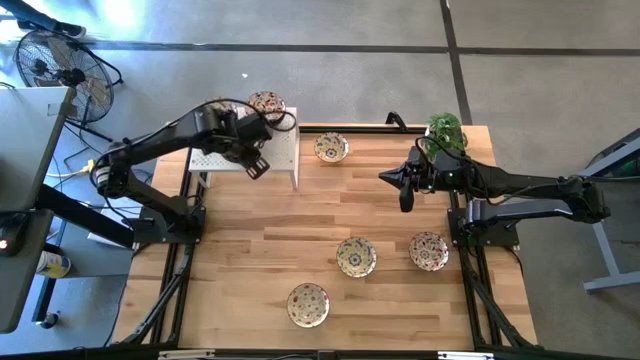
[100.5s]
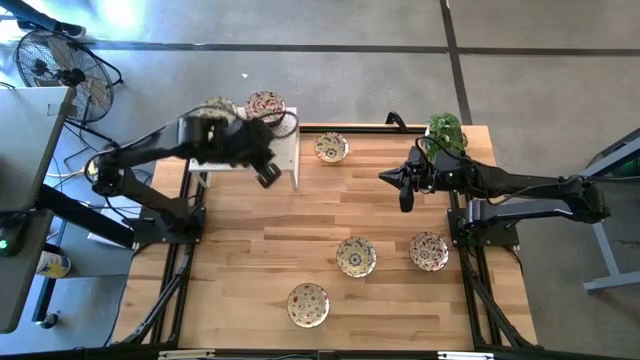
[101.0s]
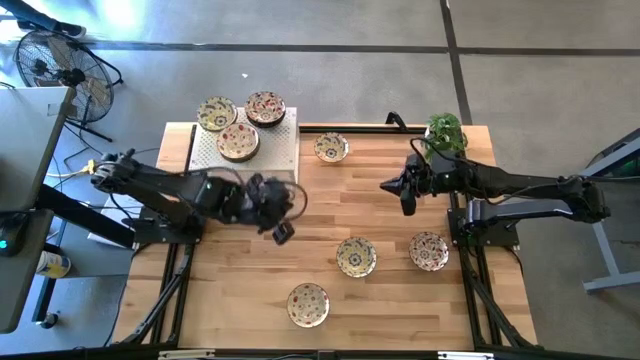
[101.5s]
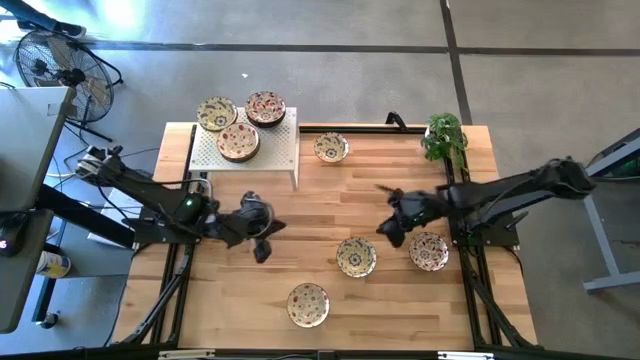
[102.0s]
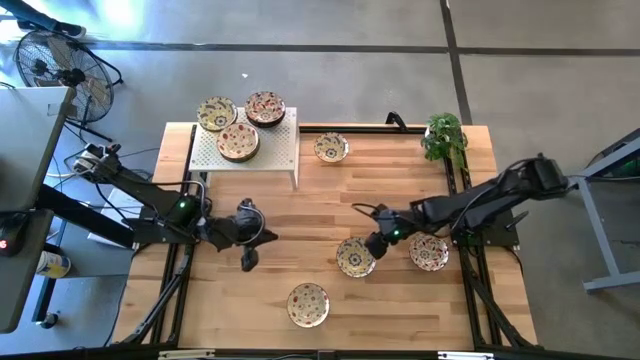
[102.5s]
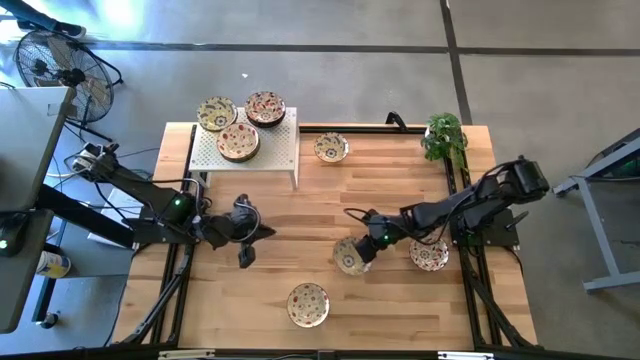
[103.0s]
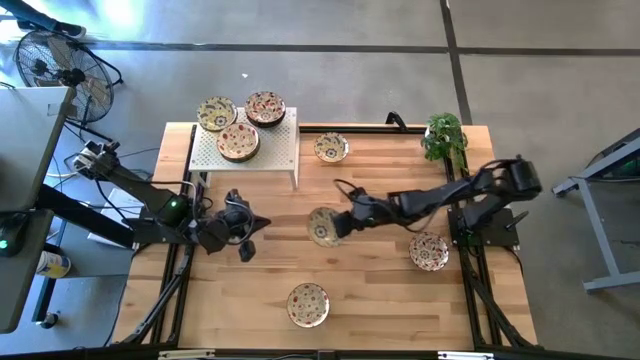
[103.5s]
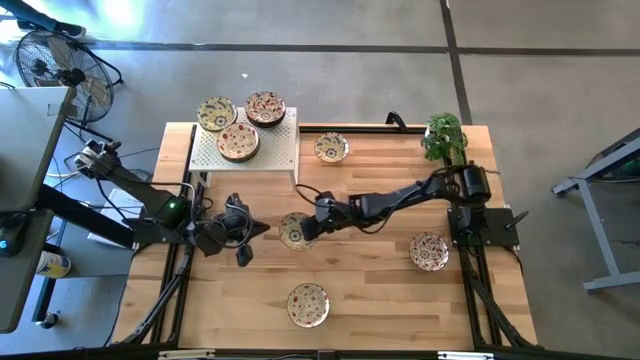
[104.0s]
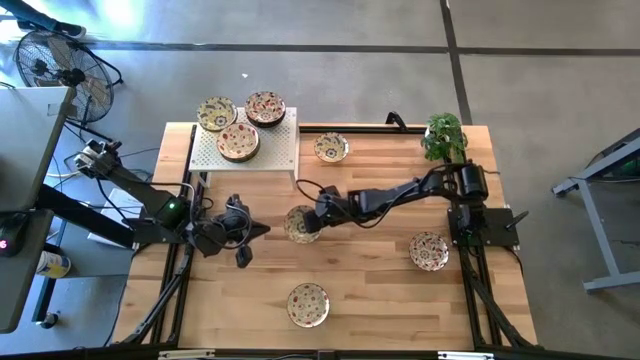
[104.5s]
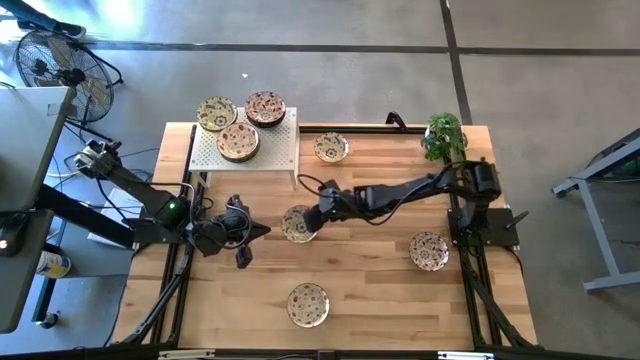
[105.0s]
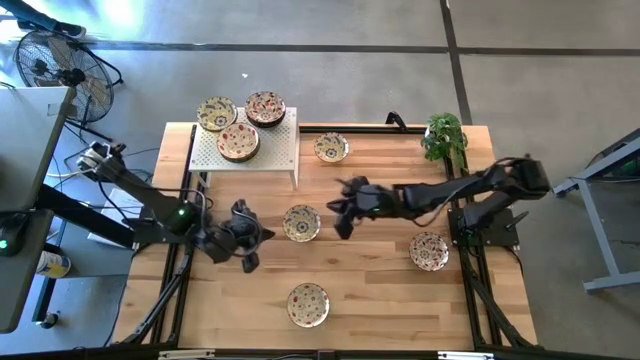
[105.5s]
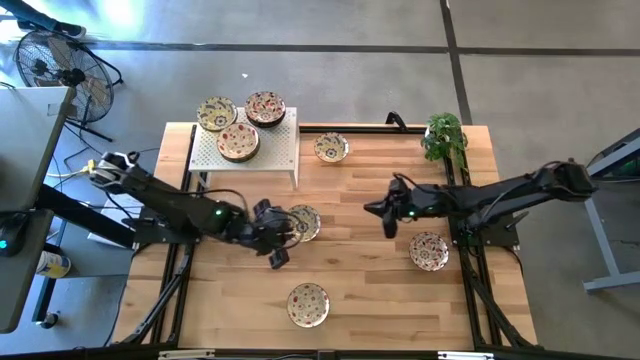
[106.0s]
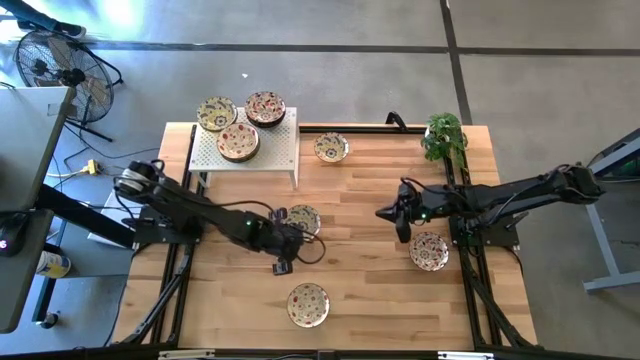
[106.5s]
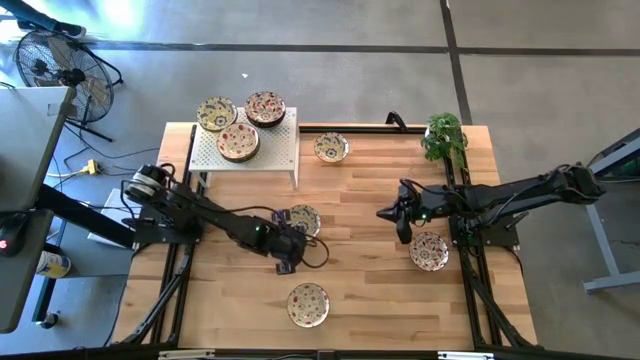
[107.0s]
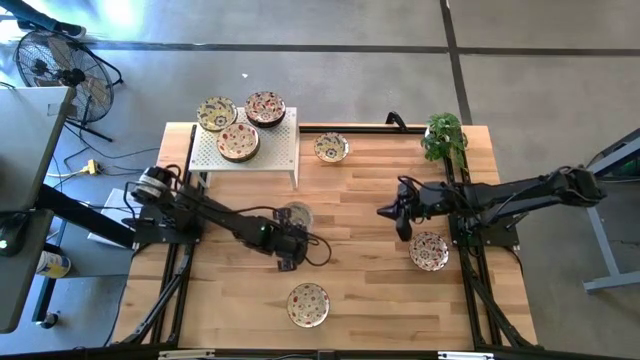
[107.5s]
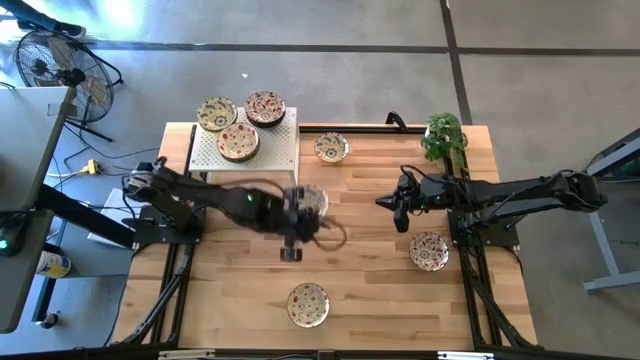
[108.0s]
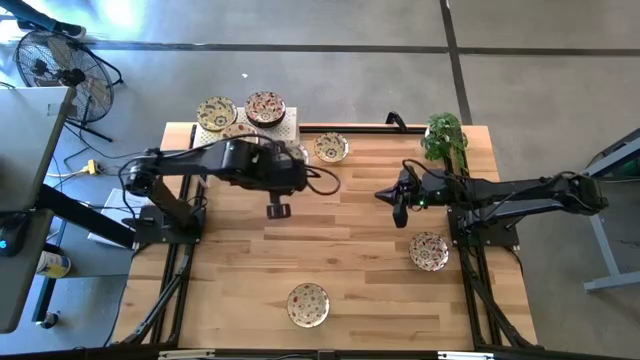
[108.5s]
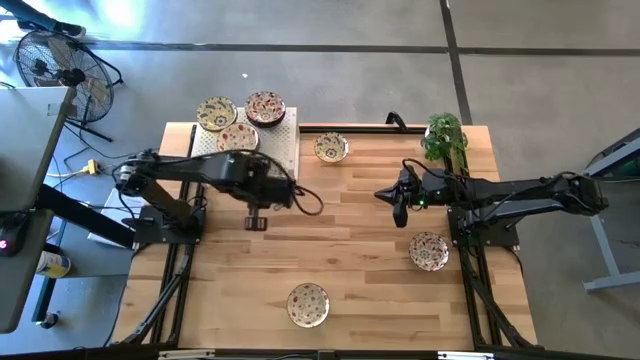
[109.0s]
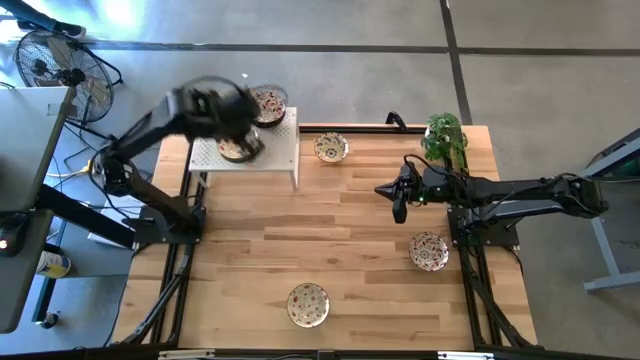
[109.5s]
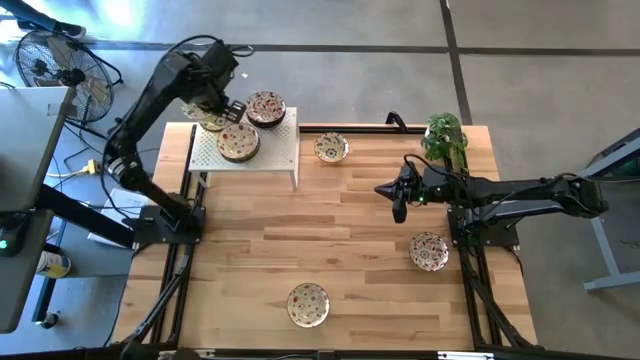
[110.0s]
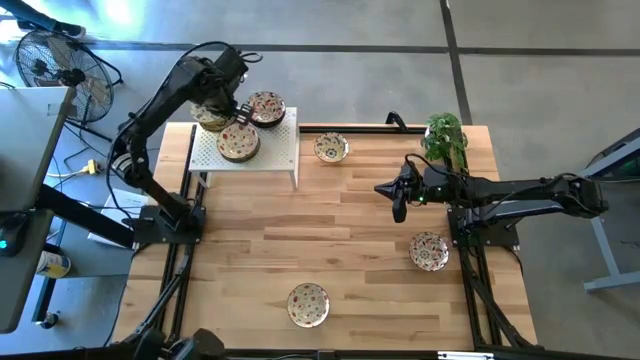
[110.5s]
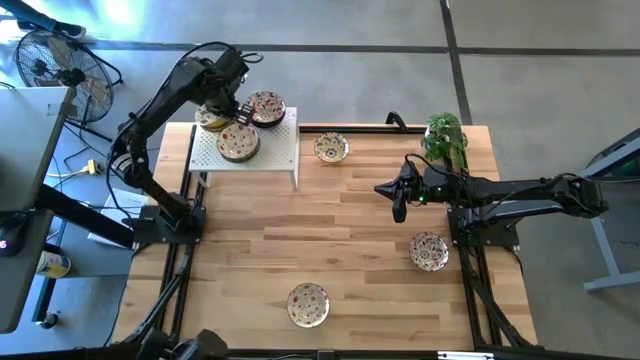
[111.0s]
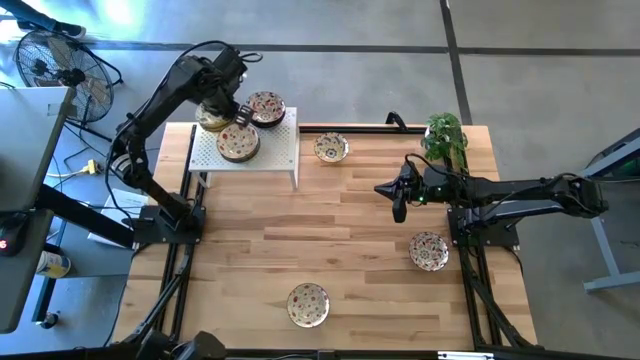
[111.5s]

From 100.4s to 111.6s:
Task: Pick & Place Mini bowls
Stack the yellow patterned bowl on the stacked yellow patterned bowls on the shelf

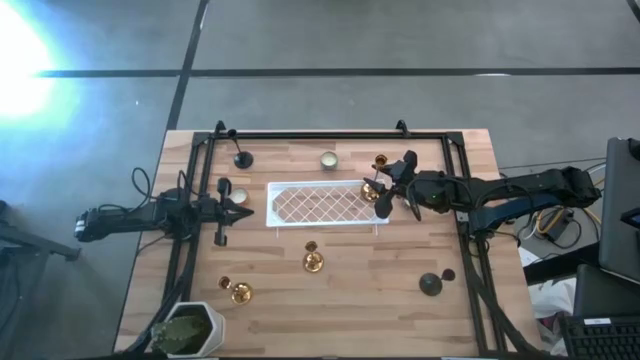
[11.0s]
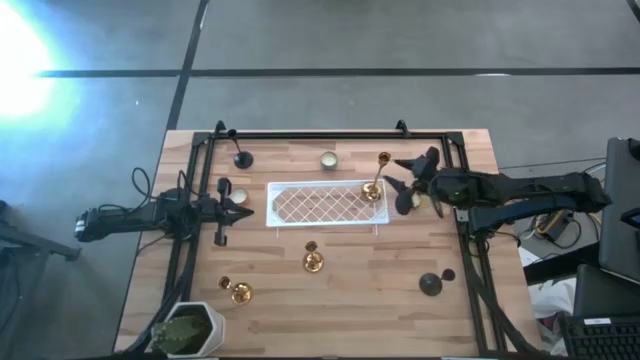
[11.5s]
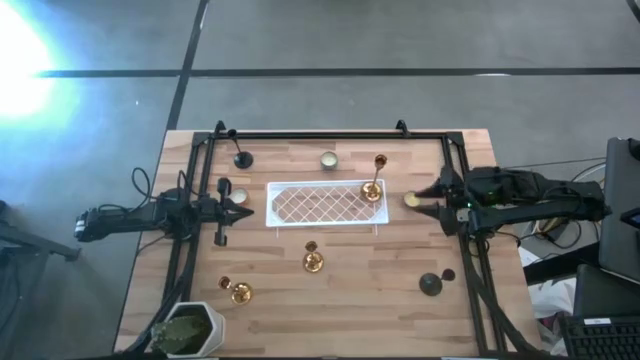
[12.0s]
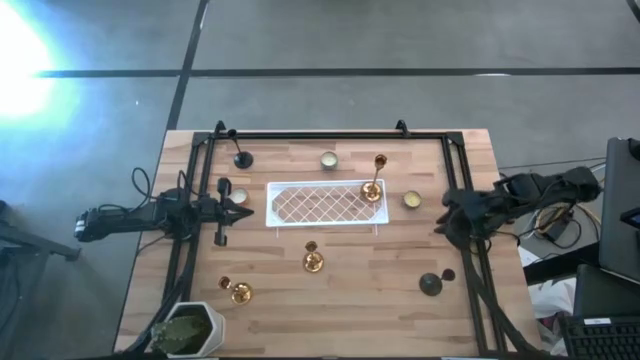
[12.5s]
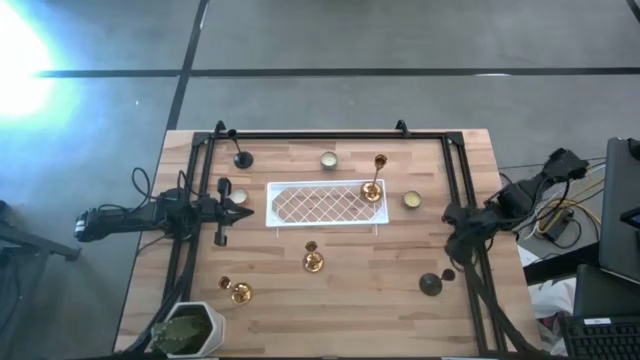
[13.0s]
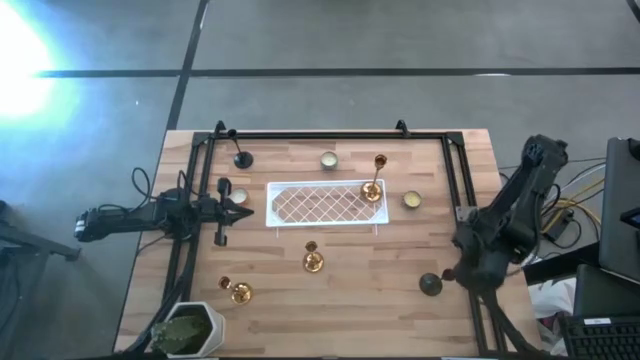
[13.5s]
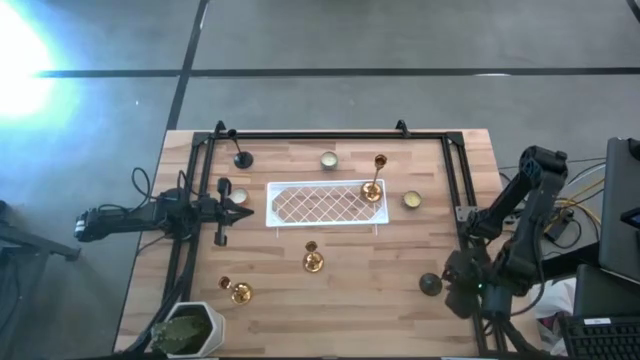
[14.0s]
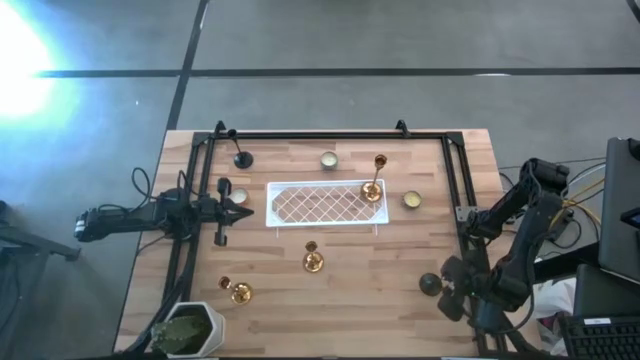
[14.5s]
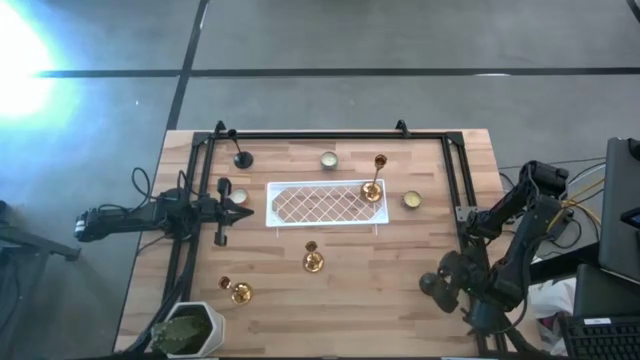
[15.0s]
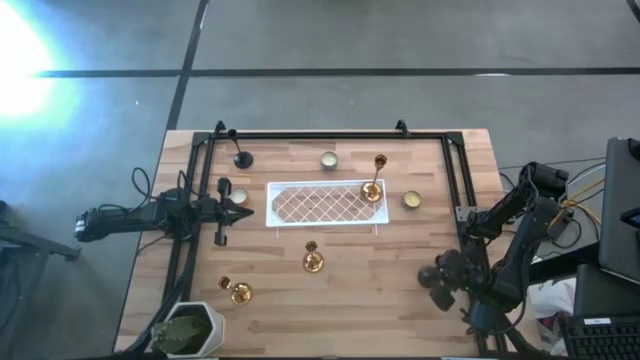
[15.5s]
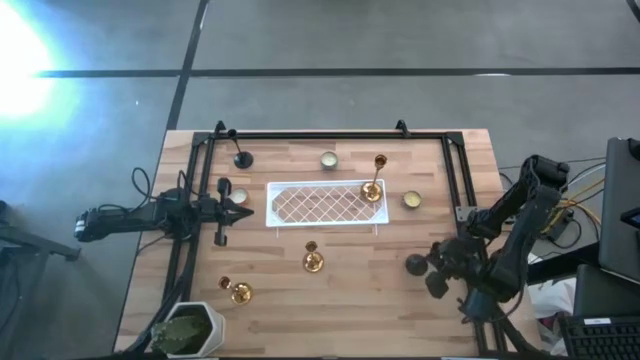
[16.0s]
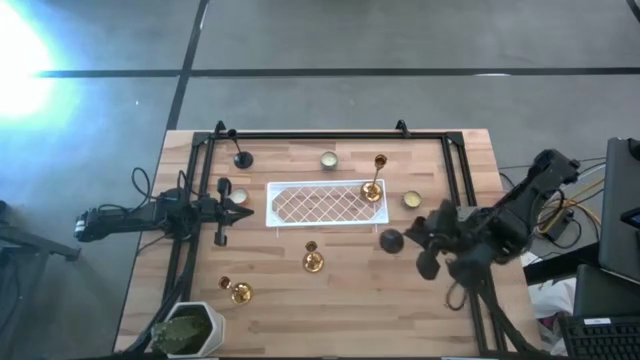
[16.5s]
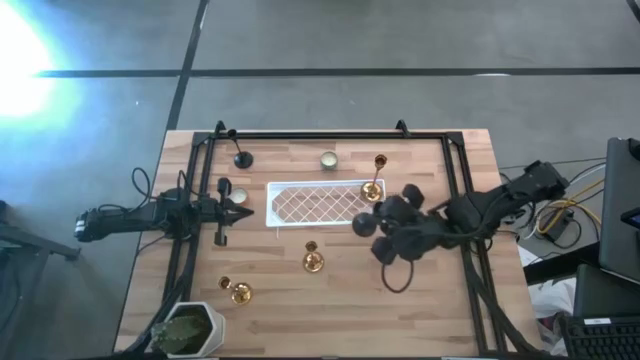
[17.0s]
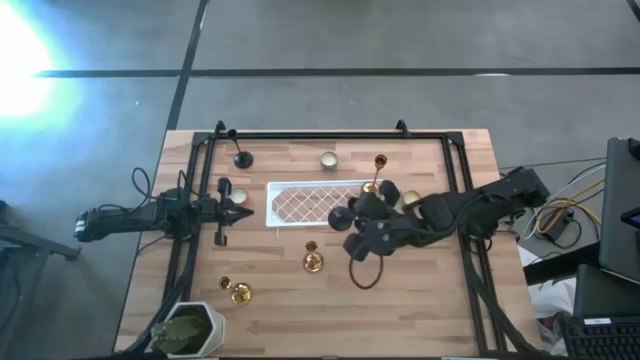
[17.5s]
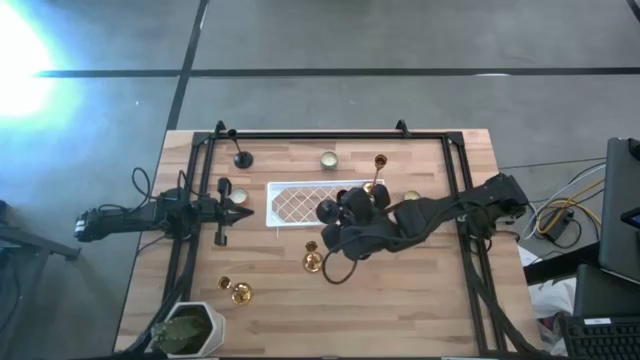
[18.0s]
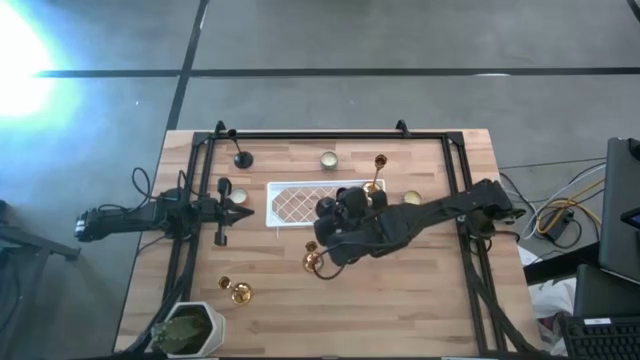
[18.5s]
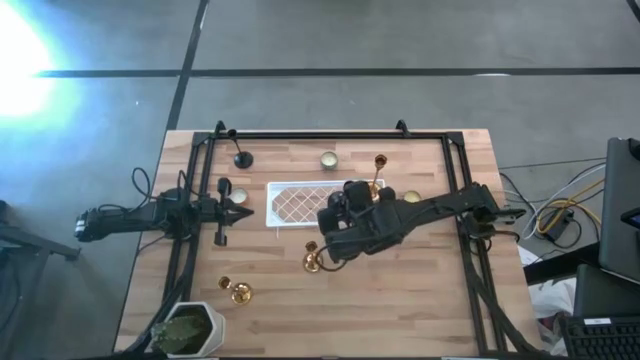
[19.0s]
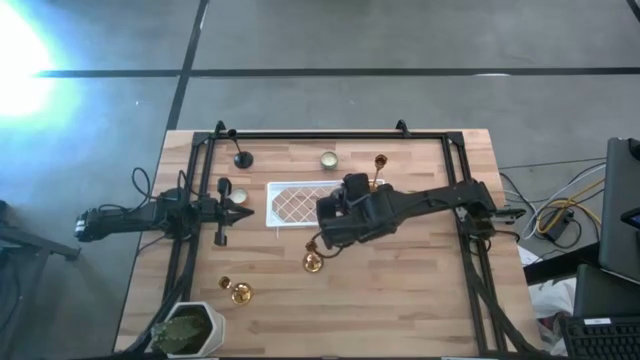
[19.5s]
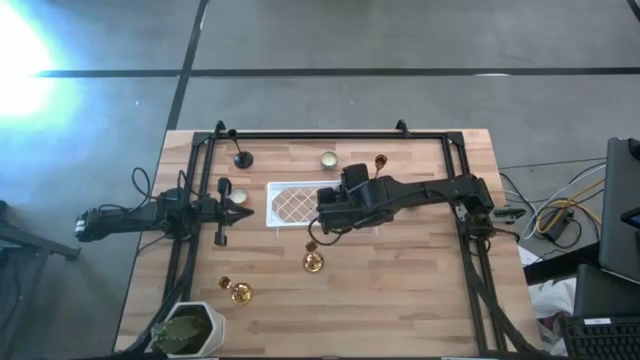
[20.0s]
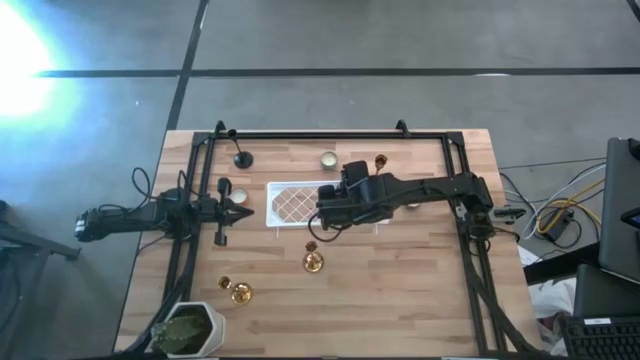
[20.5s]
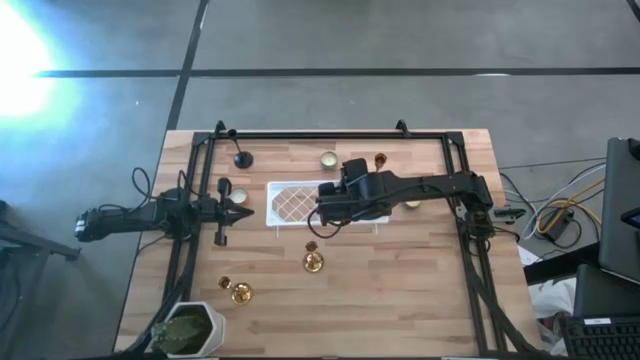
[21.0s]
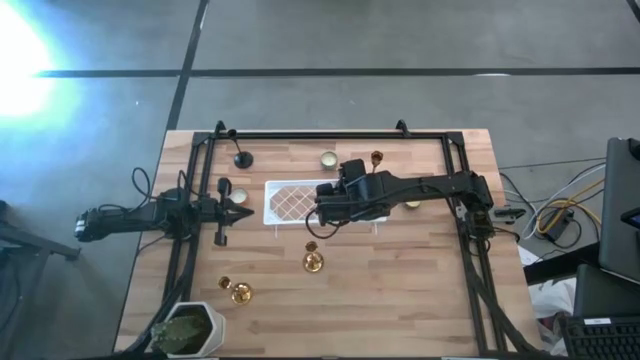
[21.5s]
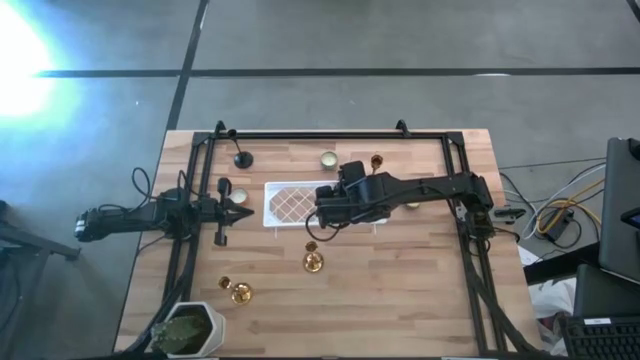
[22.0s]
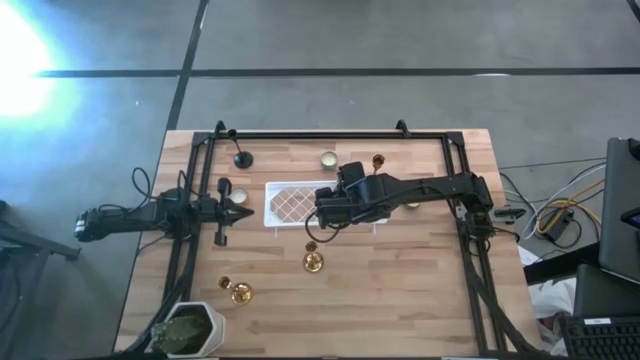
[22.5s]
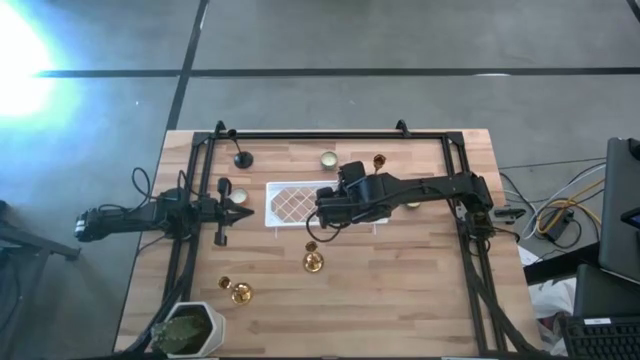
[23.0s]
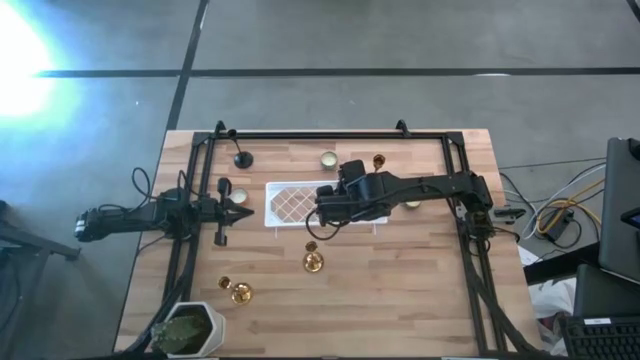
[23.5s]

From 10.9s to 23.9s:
Task: Pick & Place candle stick holders
Put the bottom black candle holder on the shelf
